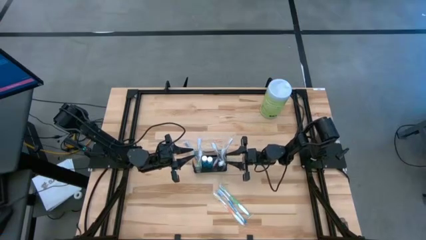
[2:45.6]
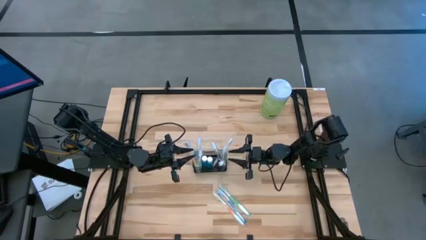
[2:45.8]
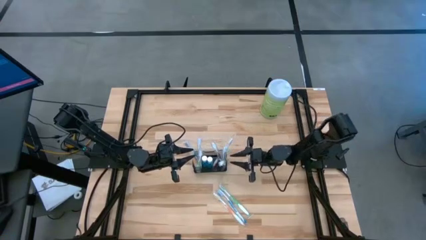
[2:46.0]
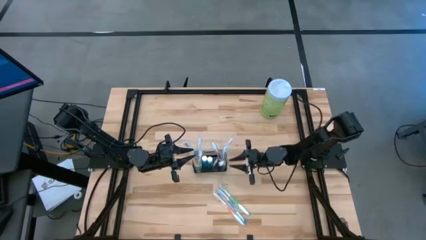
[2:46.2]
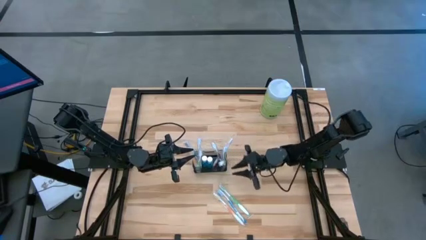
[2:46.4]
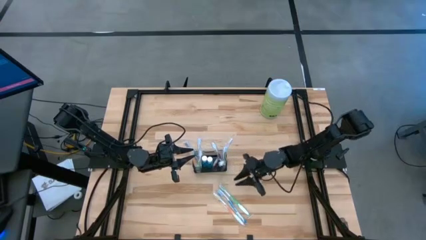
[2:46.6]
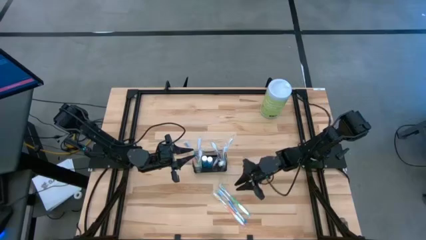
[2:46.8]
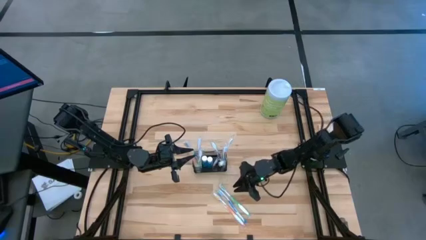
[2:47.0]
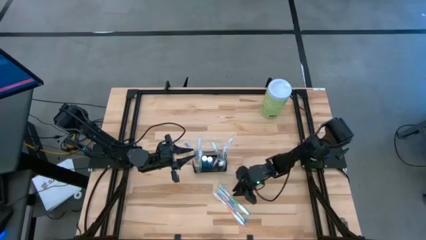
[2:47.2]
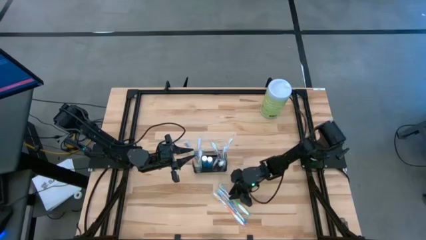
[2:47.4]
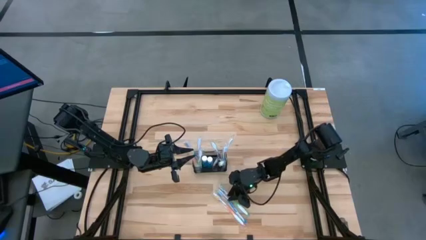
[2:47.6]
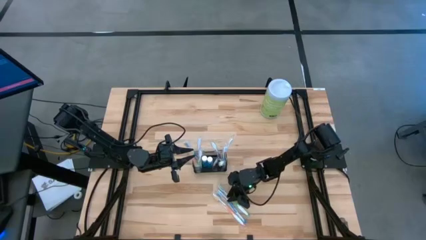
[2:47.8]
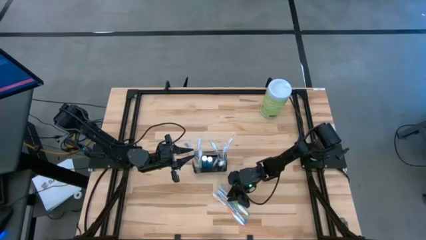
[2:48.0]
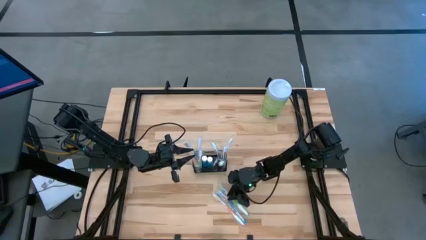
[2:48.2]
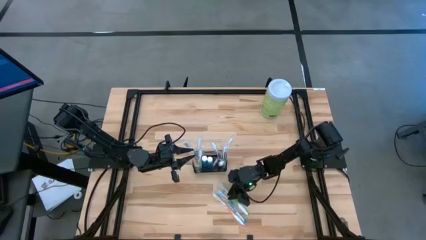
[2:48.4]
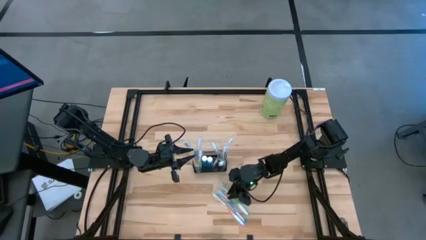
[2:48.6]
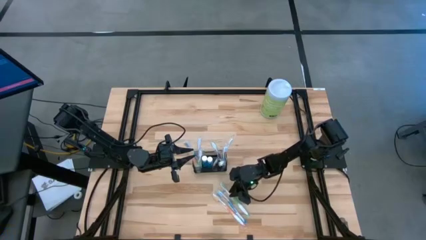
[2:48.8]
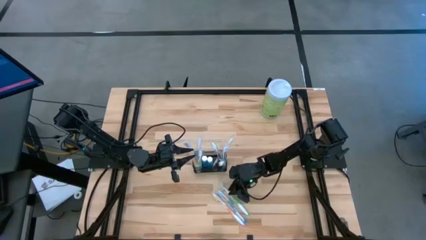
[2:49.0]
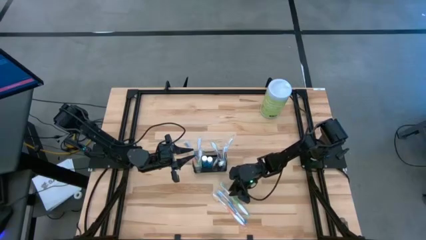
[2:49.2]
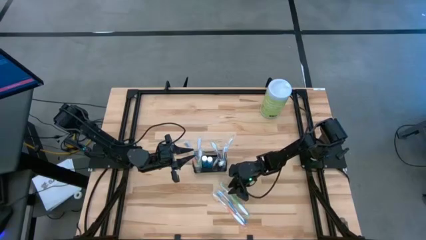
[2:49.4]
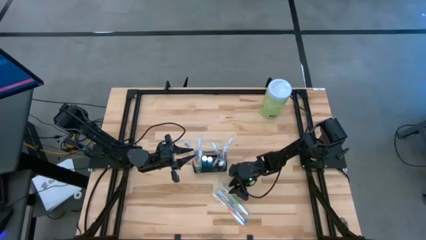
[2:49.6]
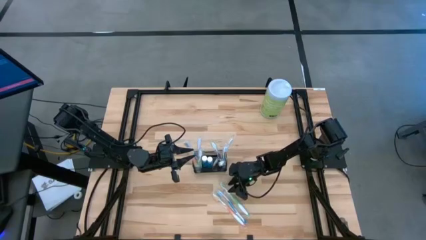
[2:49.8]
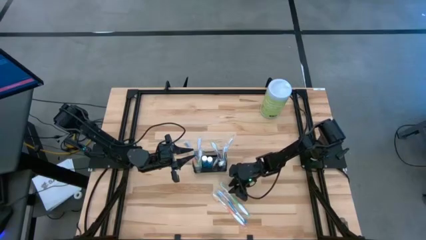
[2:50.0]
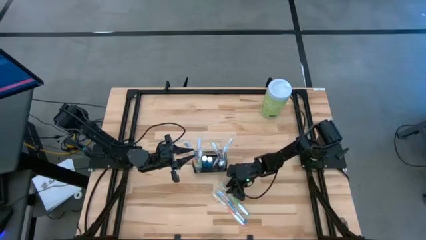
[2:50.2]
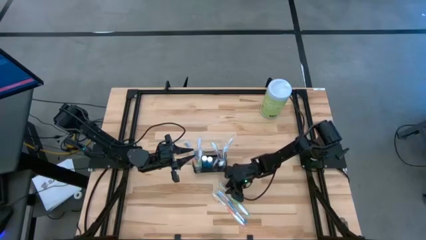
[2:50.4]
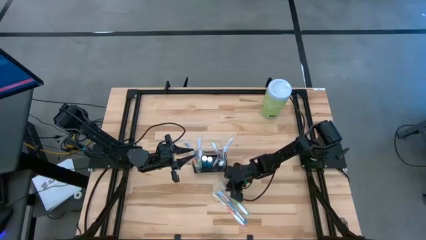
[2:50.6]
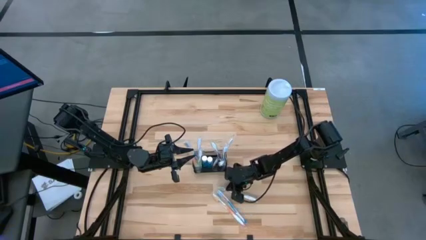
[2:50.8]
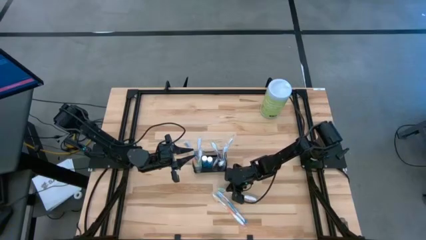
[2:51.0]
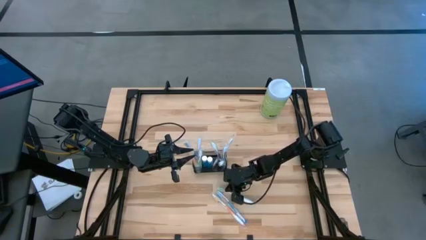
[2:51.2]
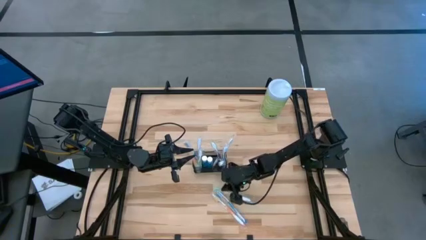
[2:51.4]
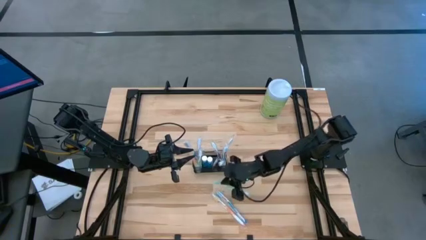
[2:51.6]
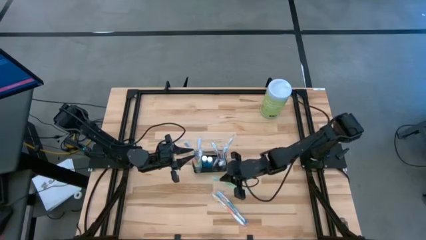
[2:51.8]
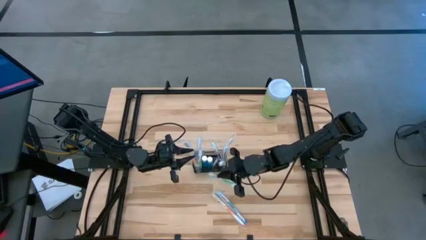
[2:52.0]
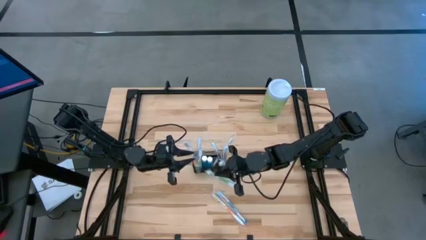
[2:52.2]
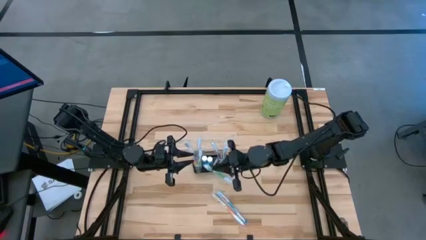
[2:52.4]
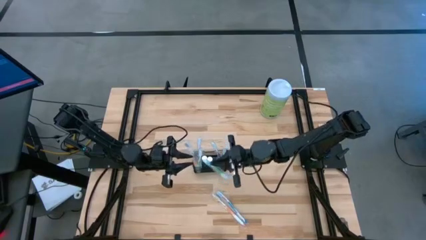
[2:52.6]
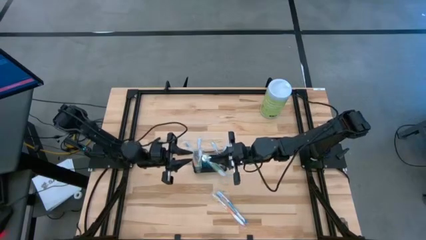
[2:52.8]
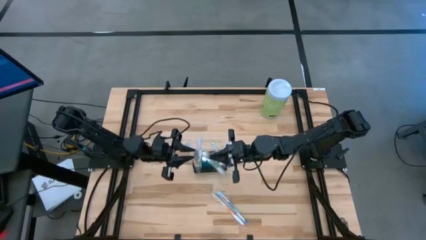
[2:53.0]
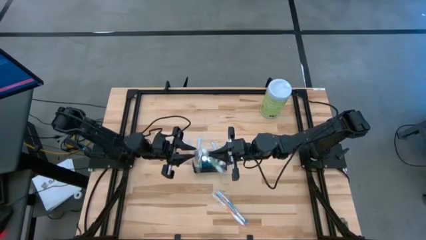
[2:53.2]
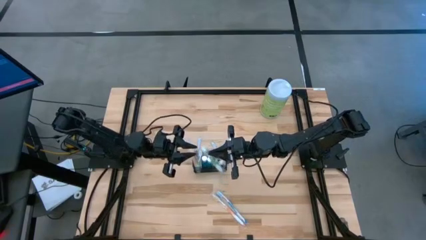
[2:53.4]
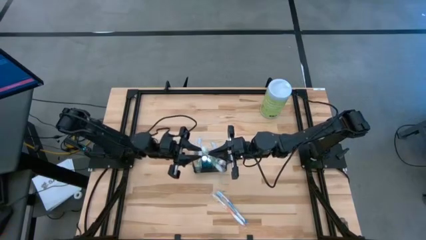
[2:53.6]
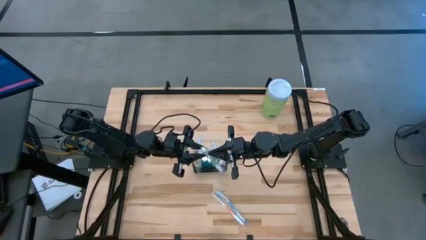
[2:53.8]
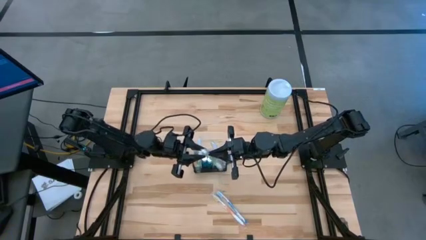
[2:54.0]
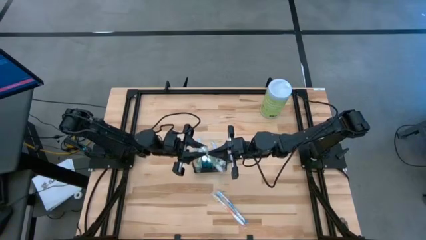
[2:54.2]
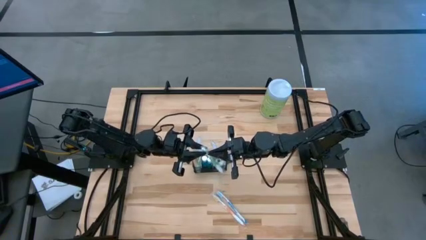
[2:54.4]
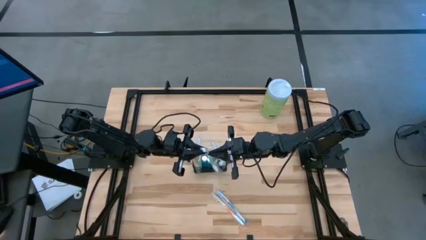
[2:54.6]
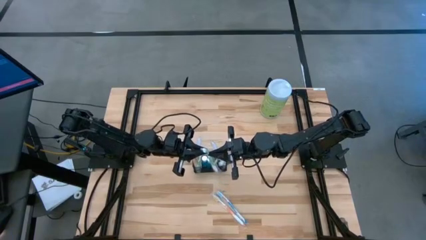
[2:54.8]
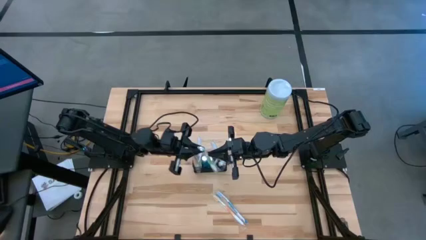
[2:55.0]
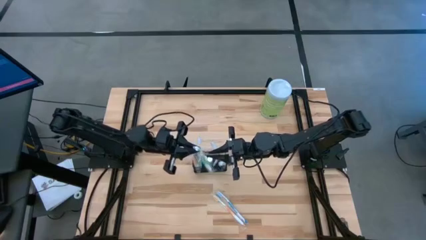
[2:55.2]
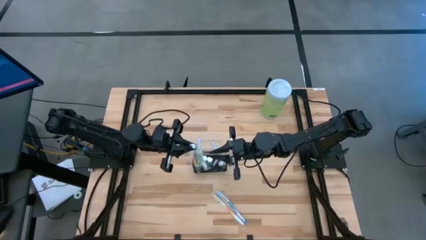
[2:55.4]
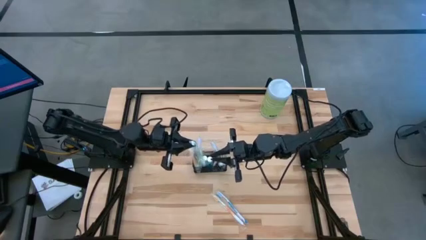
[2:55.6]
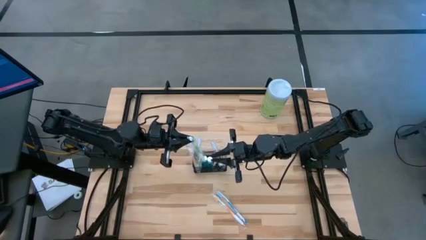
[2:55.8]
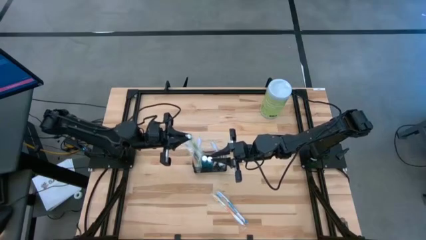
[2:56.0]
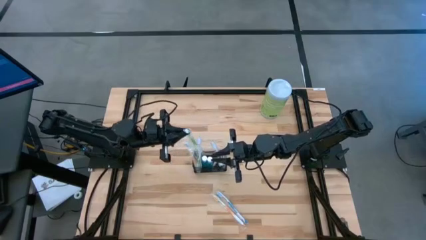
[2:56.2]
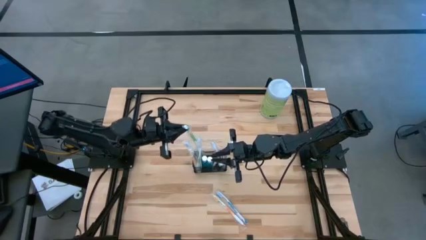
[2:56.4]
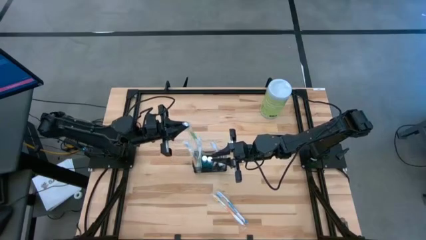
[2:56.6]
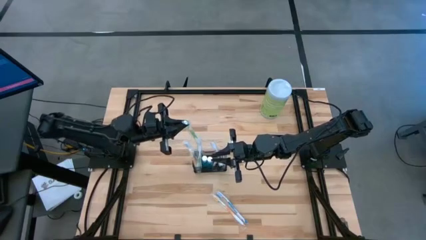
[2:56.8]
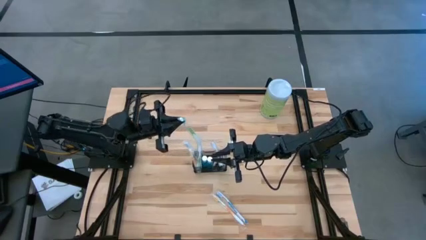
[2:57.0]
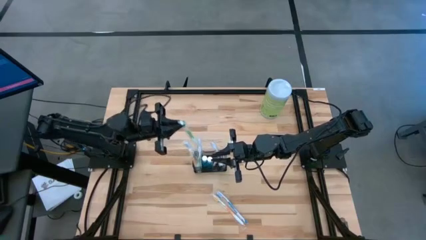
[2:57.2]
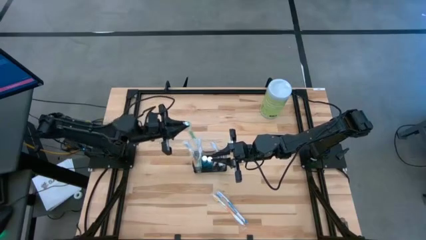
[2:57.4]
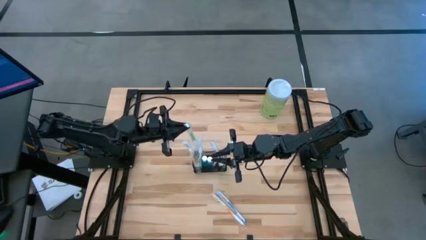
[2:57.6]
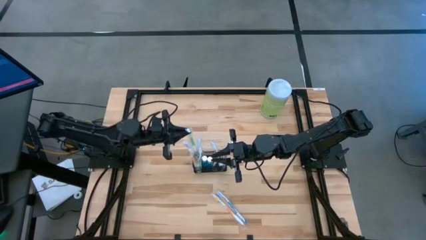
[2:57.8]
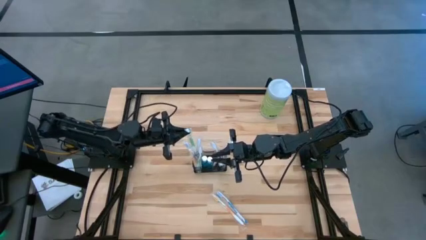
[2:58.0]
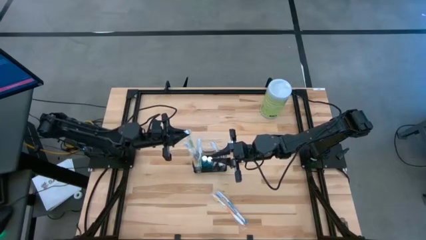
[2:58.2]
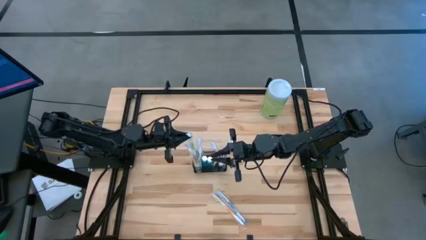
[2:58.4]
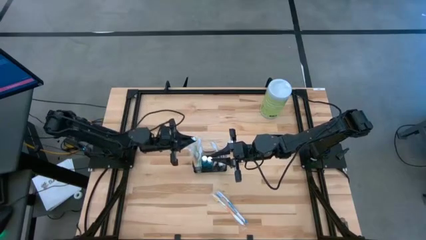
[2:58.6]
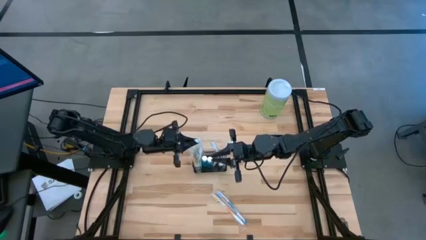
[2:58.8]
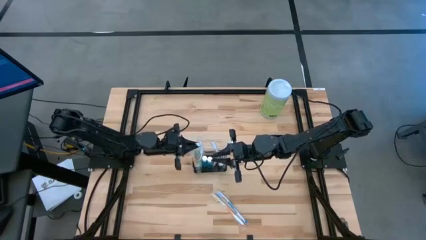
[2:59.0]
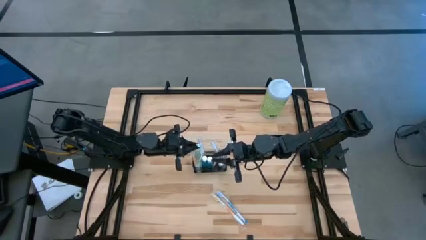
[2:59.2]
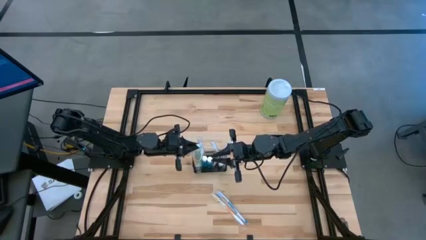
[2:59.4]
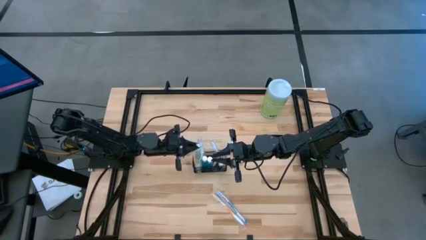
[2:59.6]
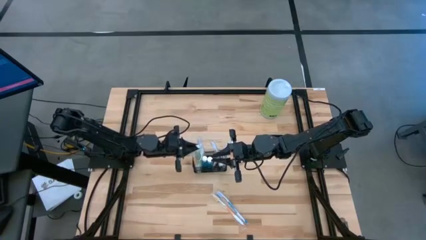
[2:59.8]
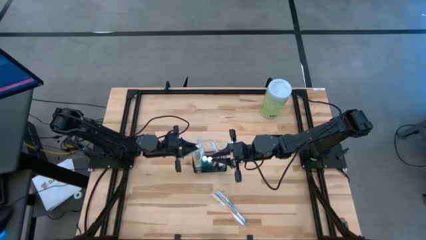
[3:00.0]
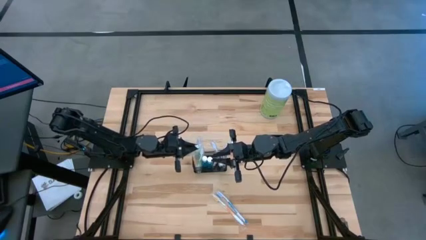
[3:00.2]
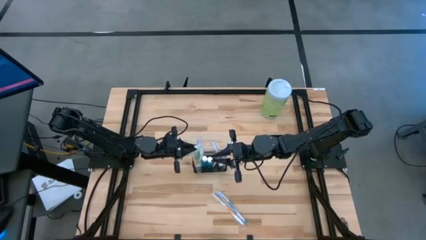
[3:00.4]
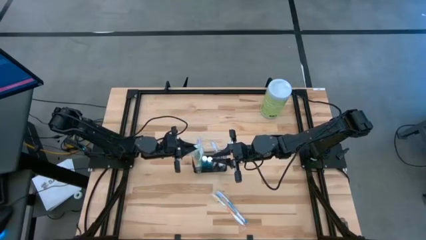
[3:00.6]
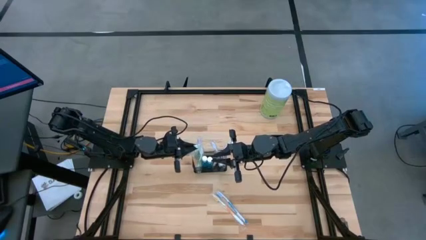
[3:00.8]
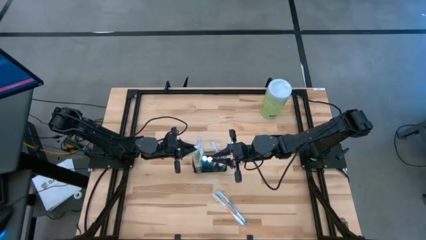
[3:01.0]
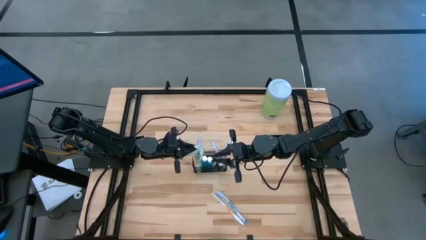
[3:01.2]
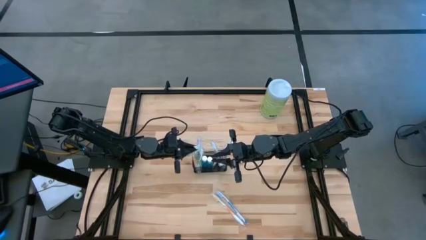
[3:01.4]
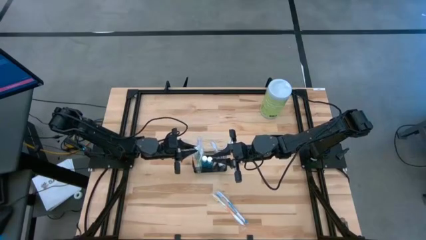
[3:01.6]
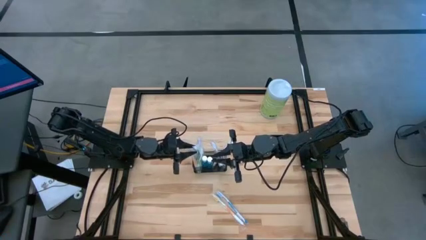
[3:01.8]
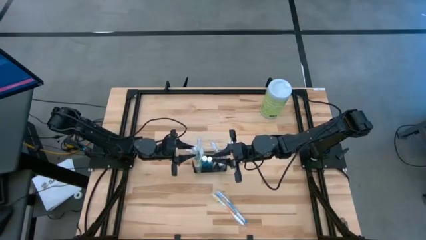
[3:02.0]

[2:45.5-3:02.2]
Task: Pick & Place toothbrushing station
Put the green toothbrush into the mesh

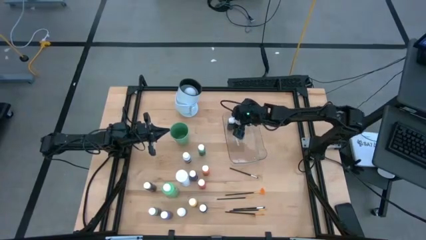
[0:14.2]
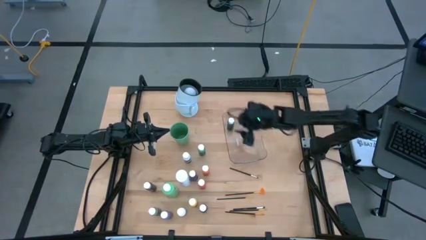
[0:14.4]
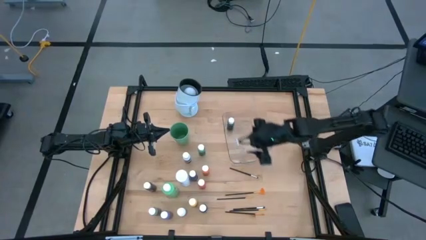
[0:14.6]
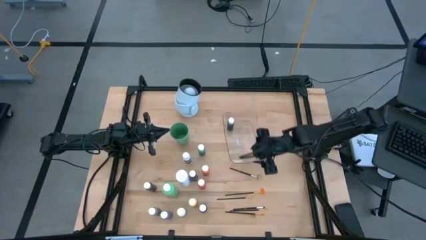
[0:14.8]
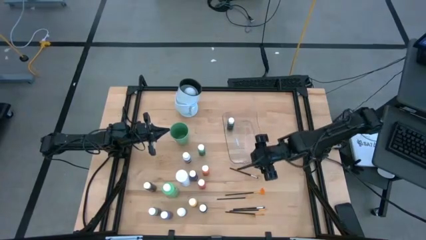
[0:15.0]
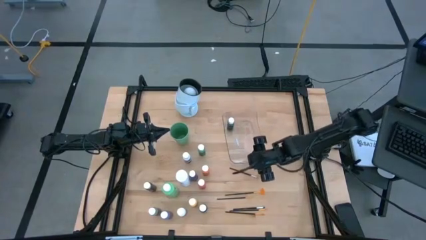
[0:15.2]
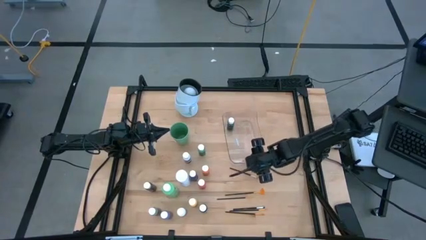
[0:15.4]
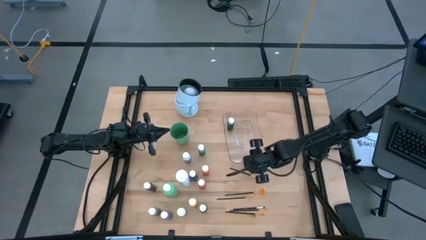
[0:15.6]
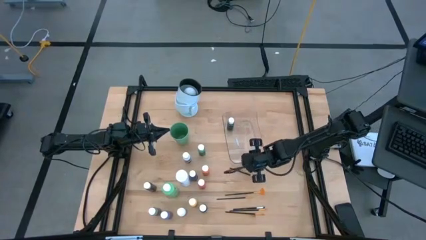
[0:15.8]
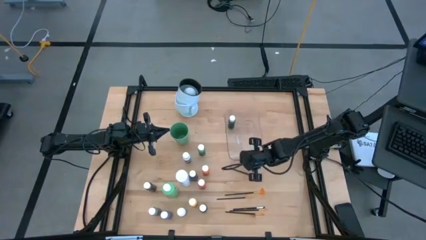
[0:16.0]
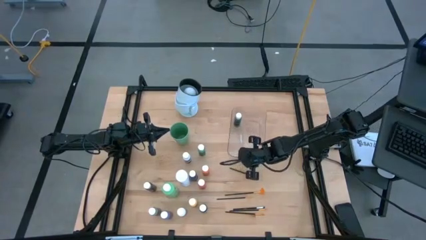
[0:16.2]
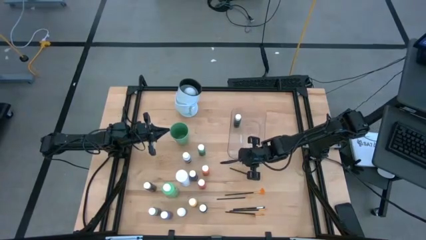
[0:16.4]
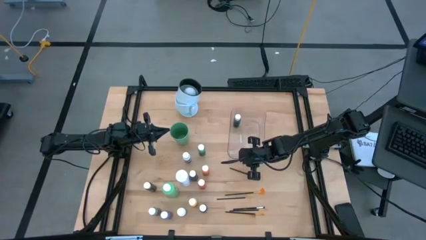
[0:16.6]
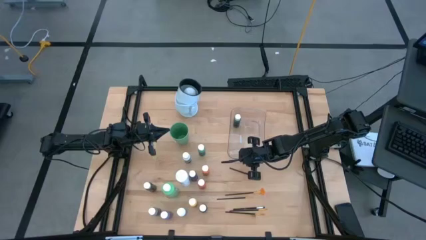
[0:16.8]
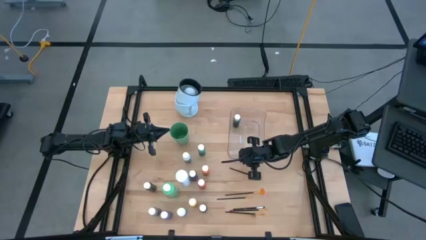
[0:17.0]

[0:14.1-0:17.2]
Task: Pick & Place Paint Supplies
Adjust the transparent bin
